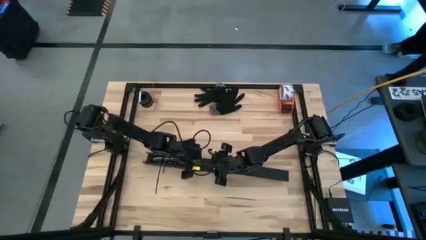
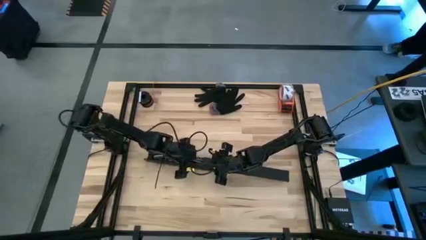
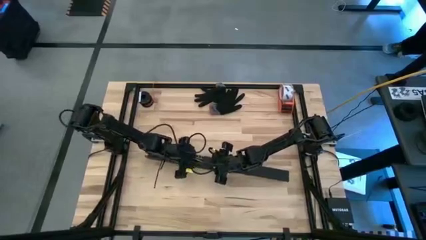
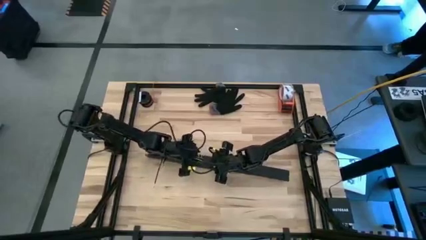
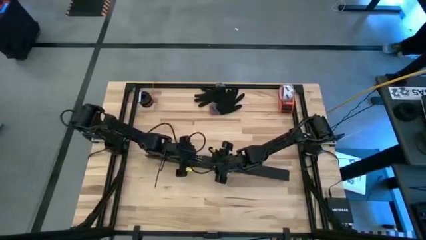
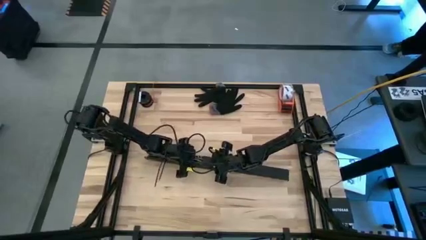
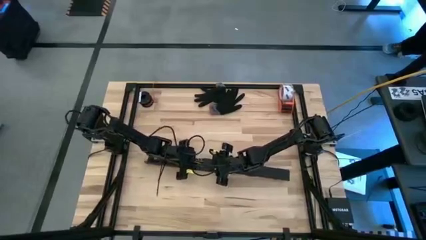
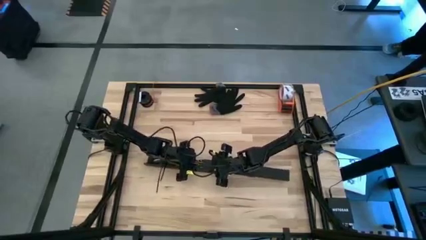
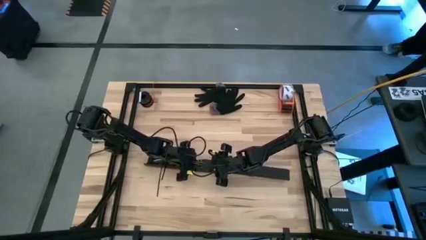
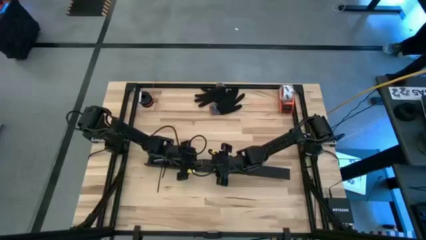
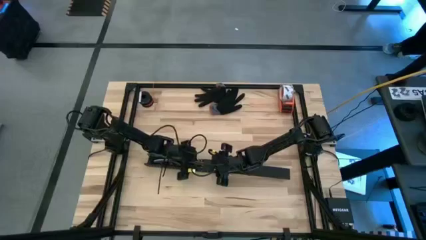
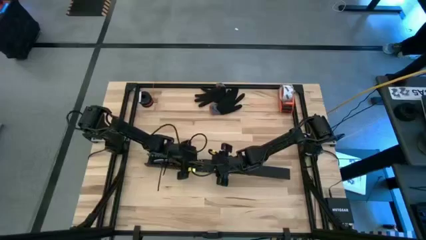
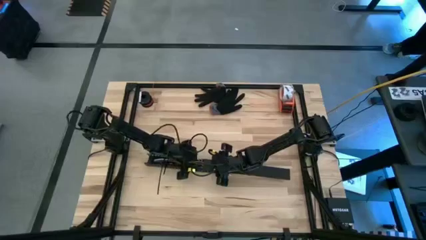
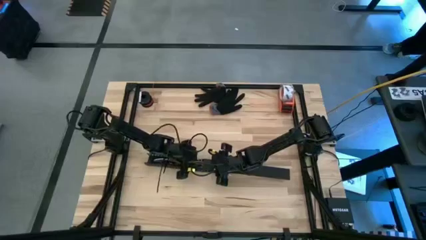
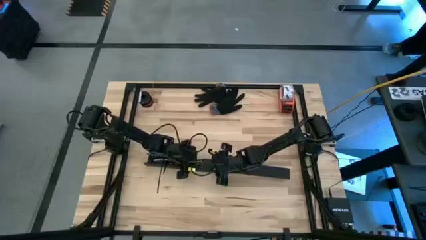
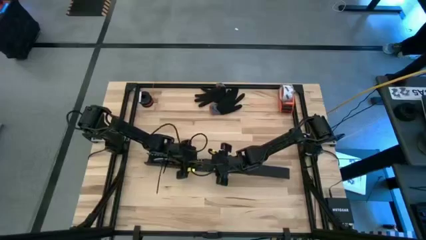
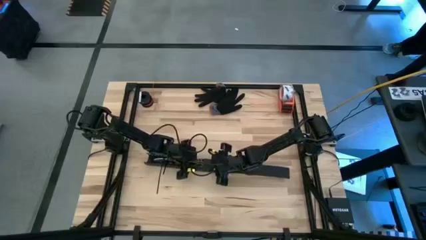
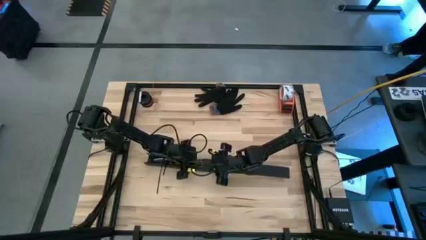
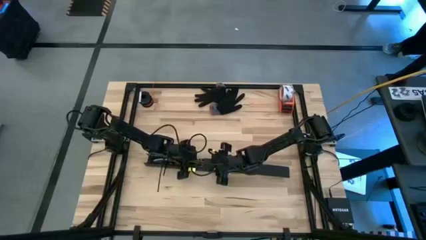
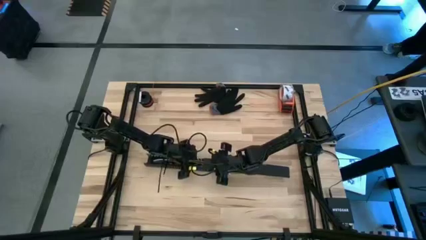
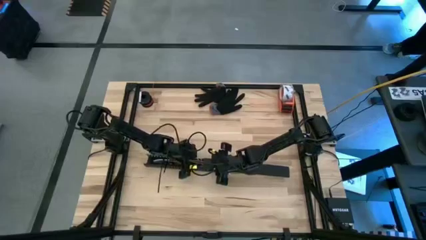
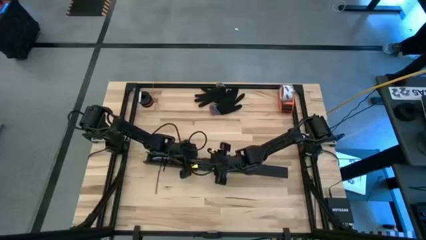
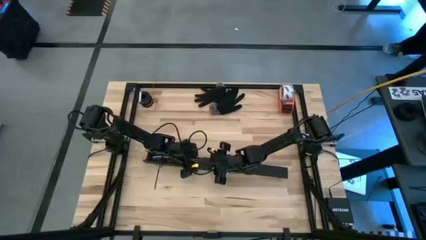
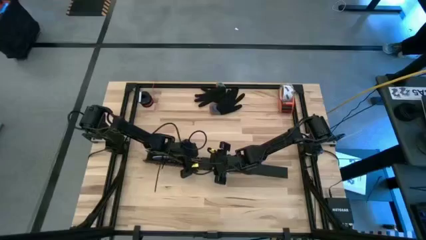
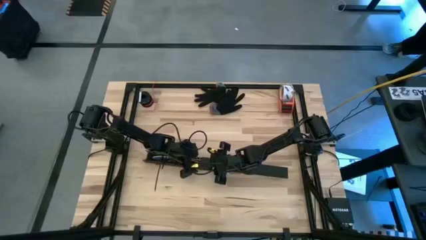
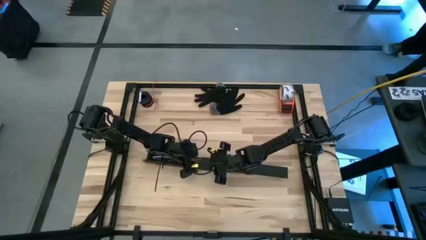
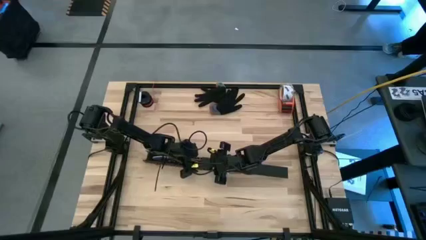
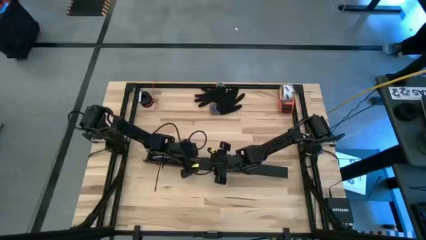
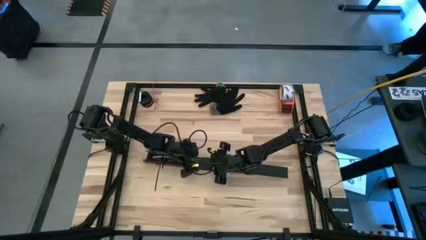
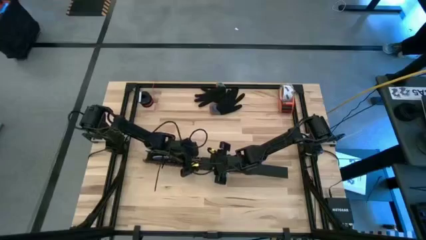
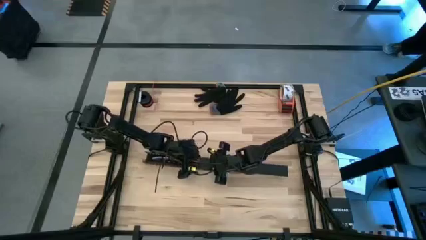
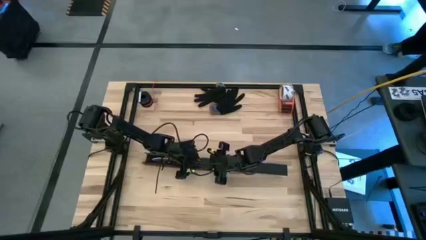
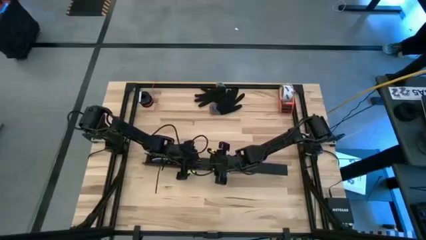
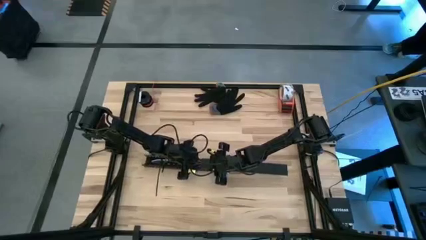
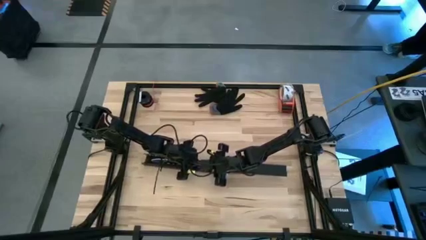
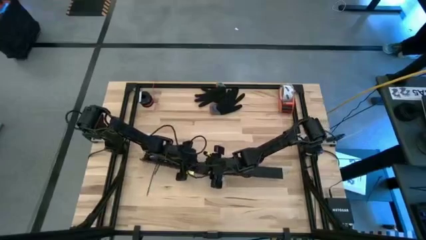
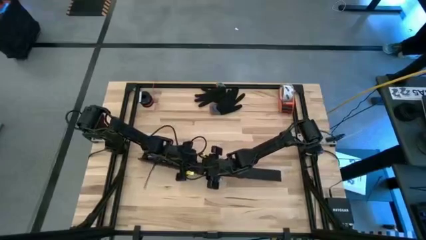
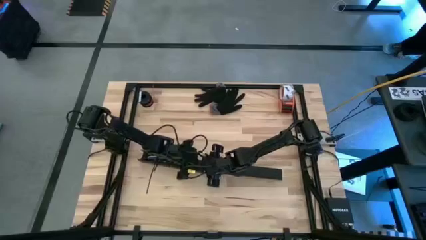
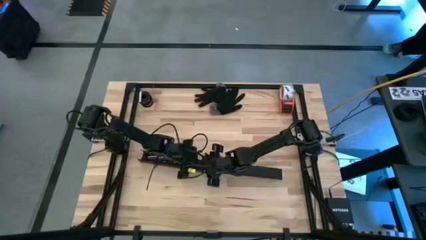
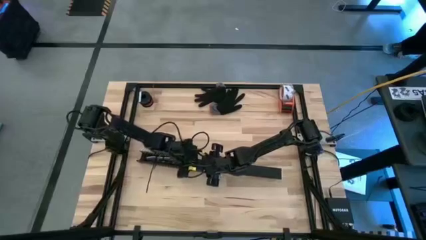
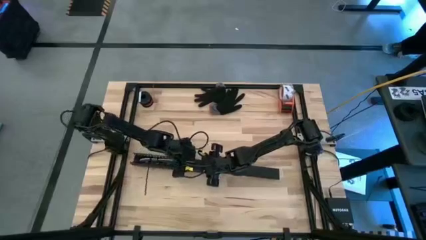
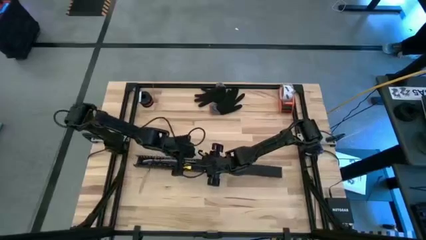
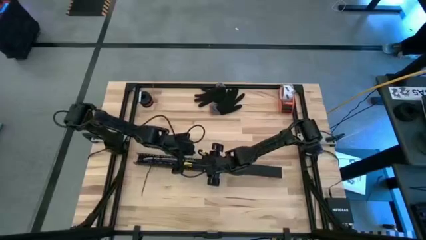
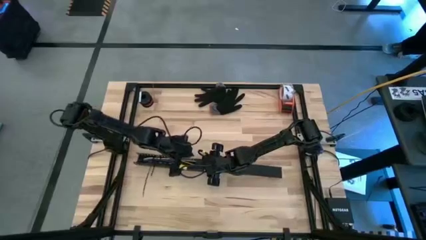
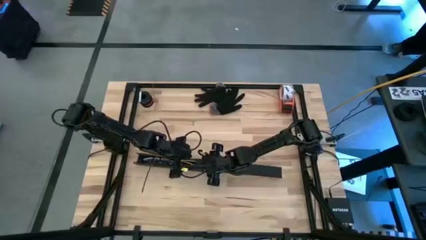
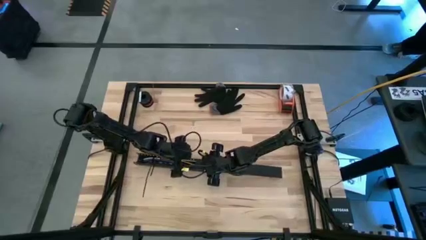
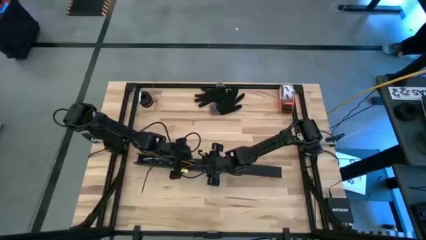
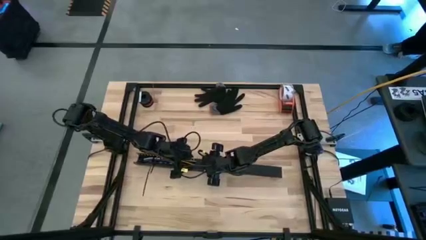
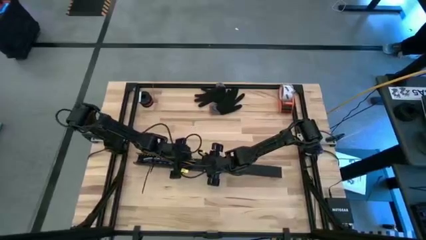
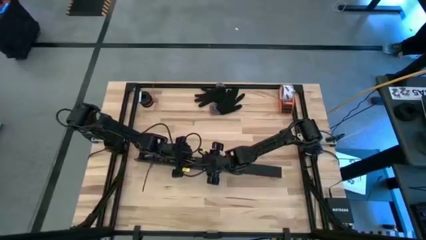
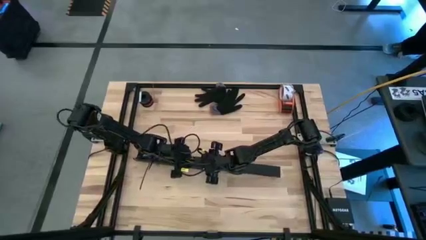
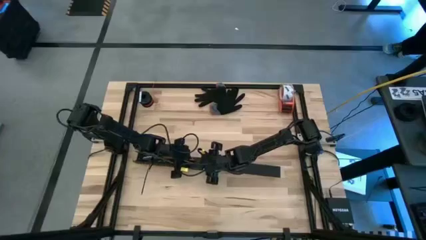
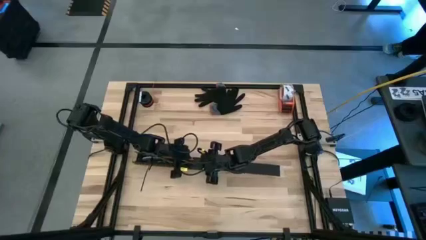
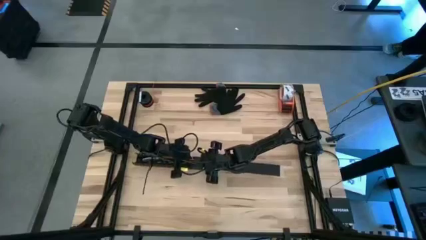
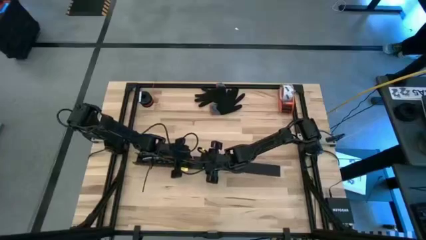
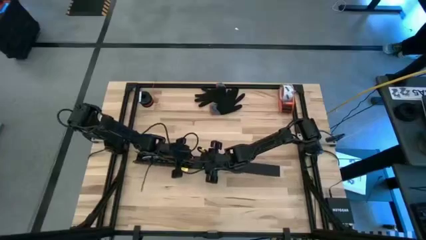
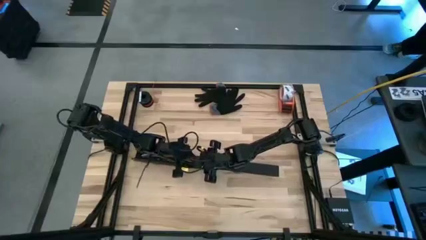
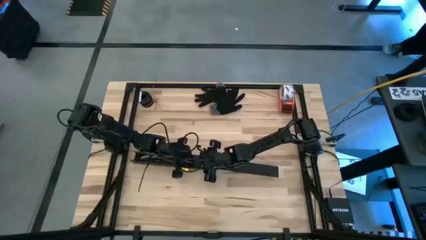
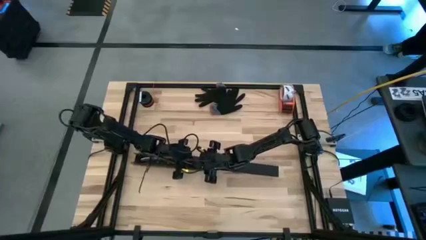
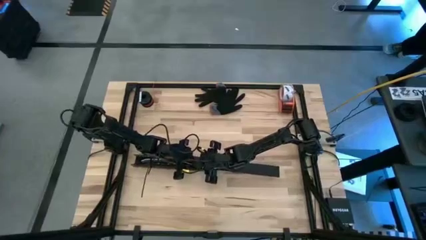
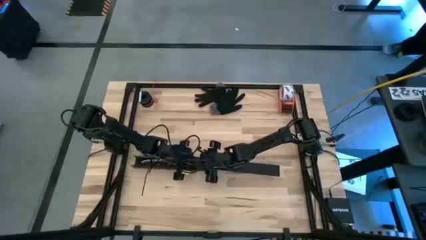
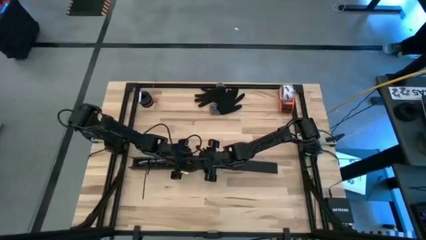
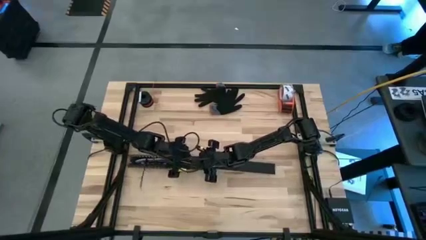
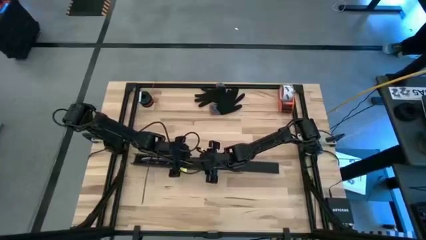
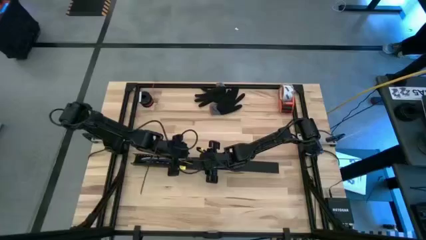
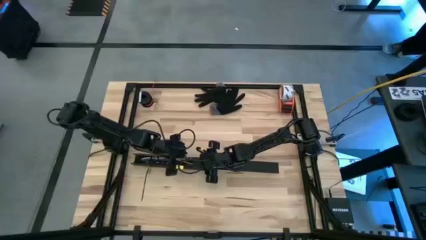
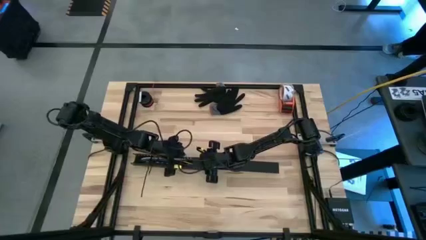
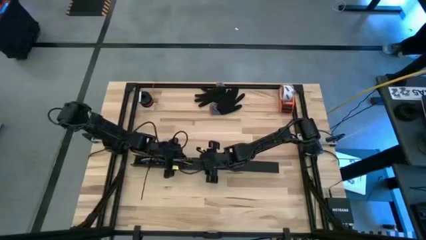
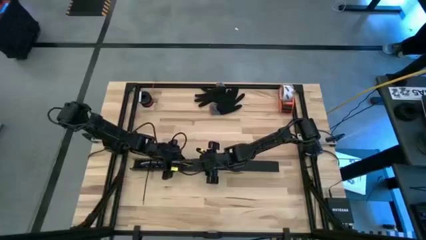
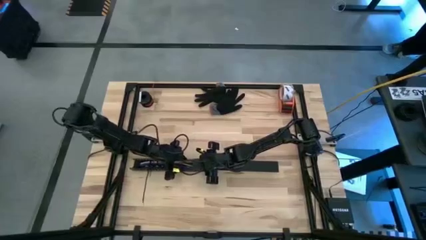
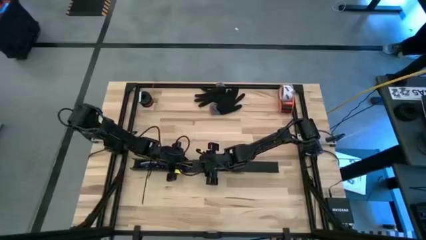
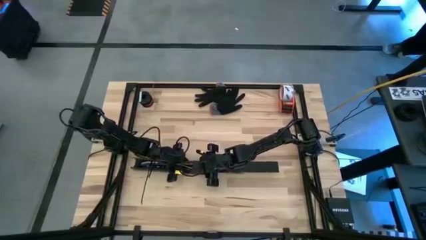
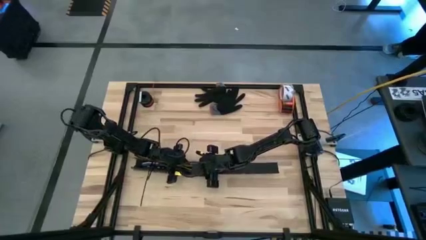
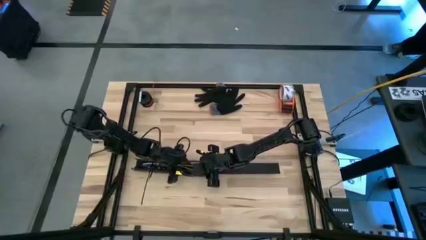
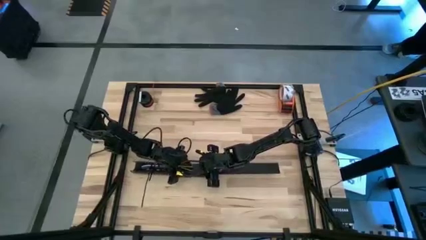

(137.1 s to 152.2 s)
Task: Ziptie cables
Close the cable duct

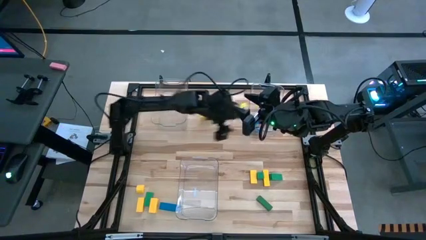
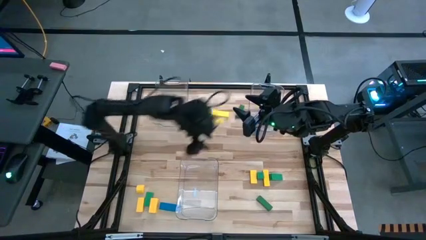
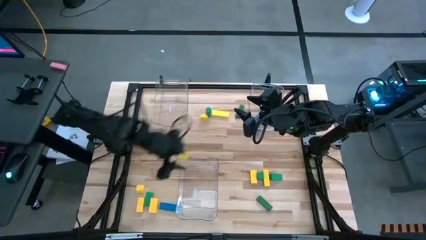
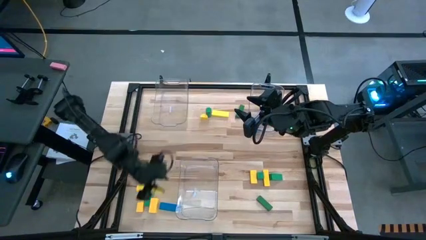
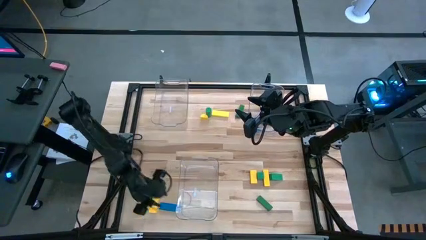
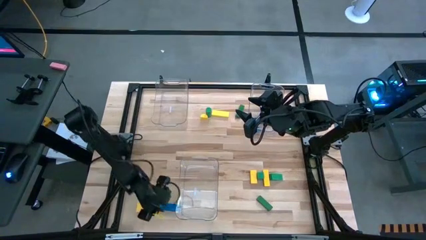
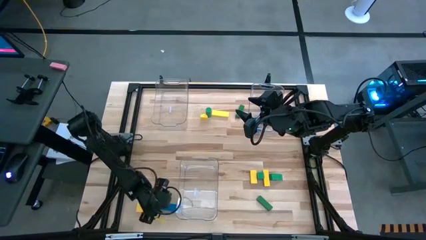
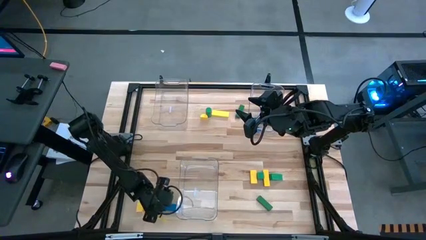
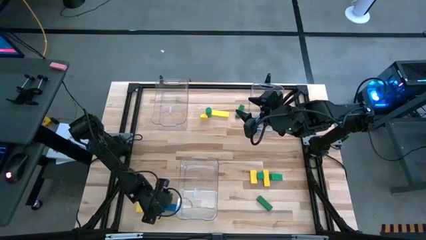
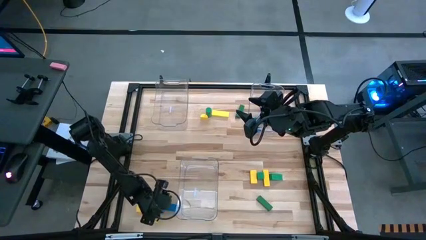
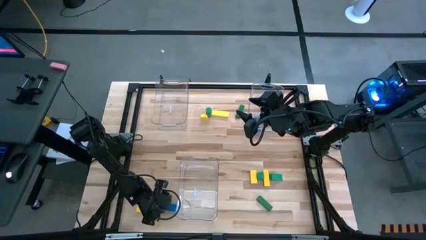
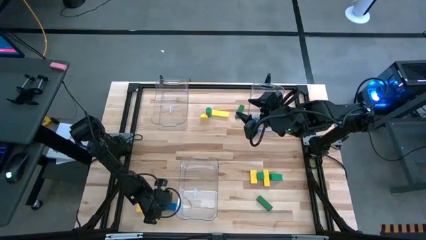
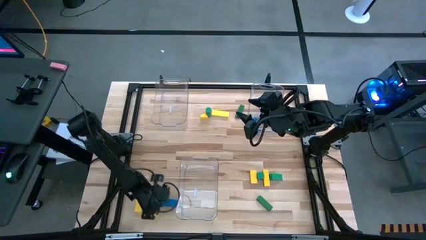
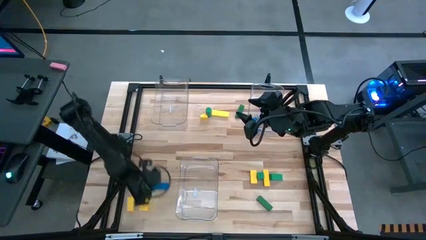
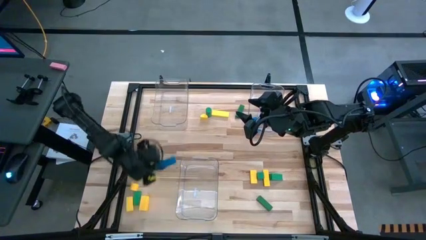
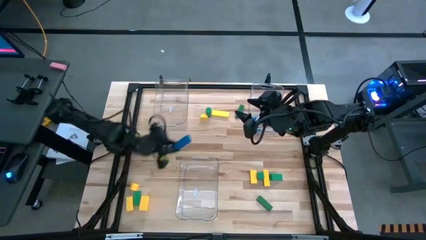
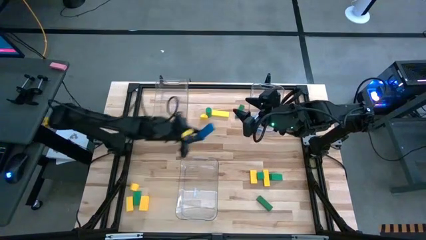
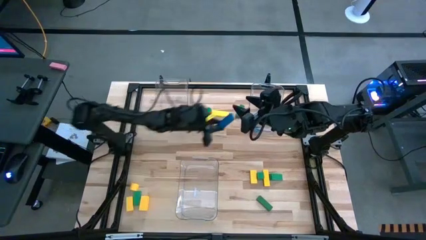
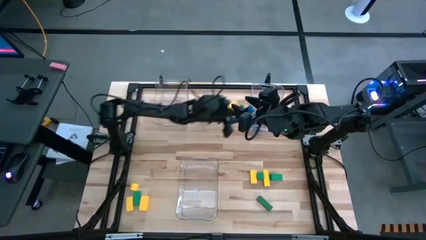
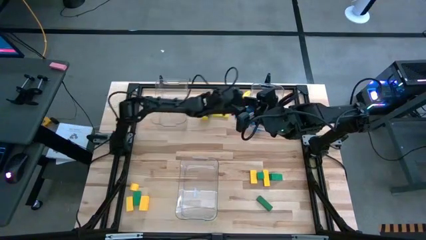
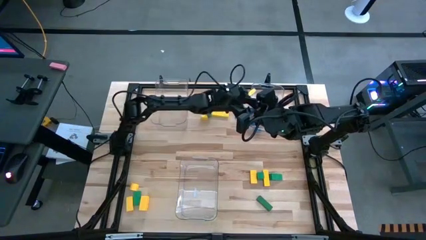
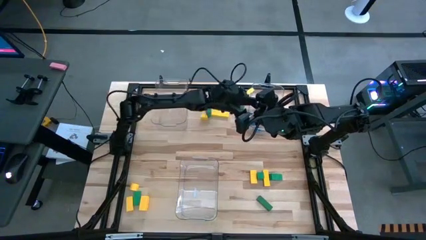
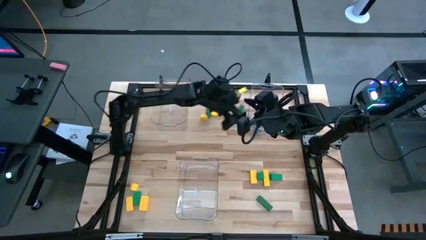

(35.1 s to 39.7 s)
Task: Sort blocks
Put the blue block into the top right transparent bin
